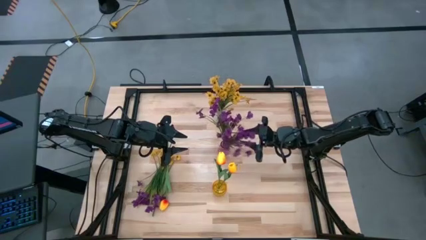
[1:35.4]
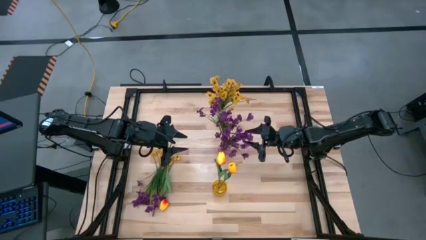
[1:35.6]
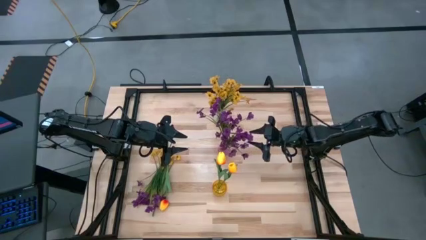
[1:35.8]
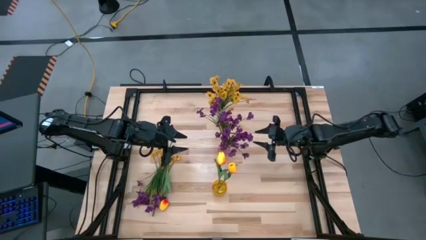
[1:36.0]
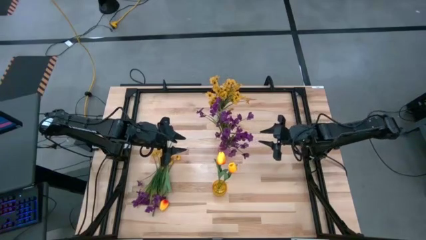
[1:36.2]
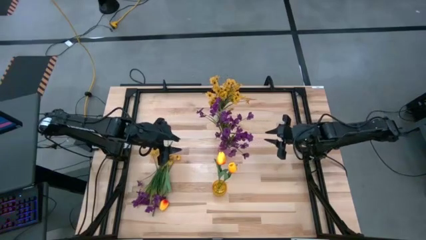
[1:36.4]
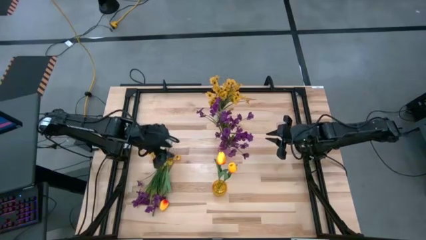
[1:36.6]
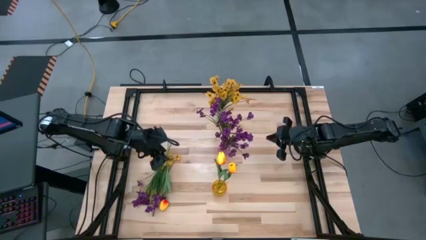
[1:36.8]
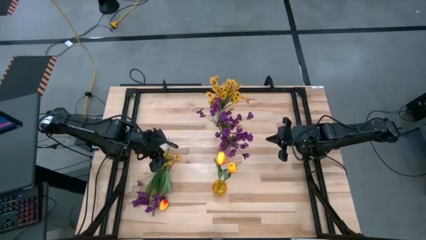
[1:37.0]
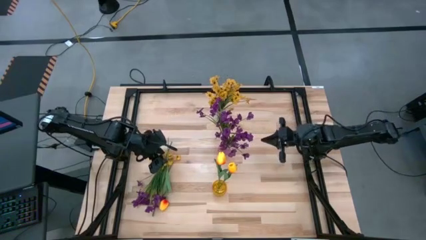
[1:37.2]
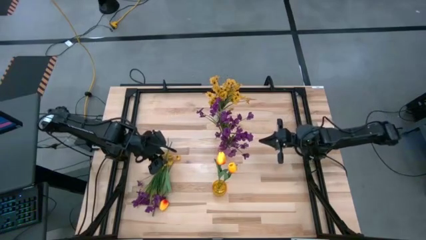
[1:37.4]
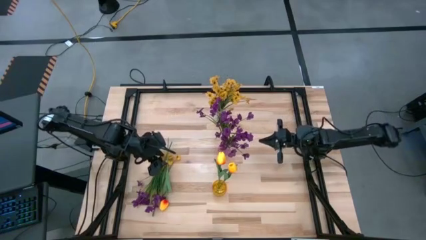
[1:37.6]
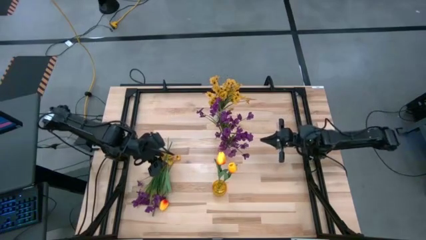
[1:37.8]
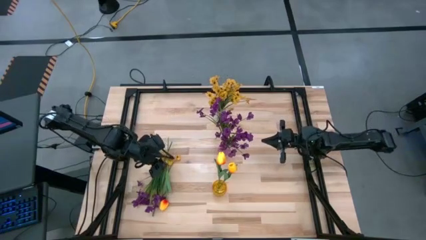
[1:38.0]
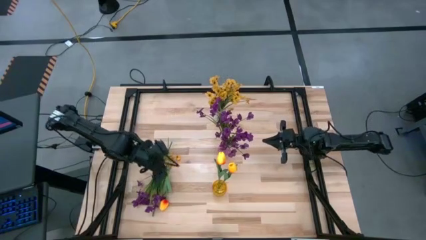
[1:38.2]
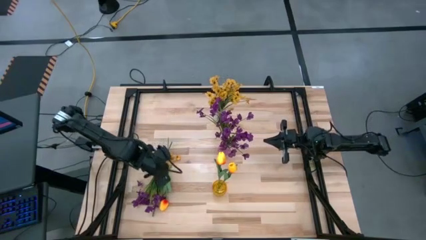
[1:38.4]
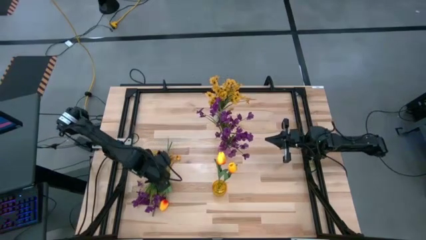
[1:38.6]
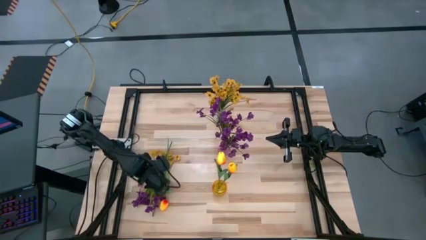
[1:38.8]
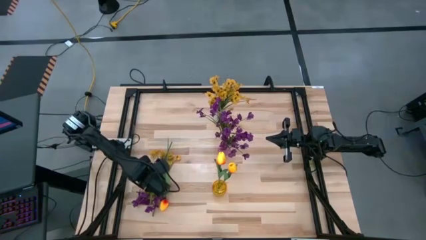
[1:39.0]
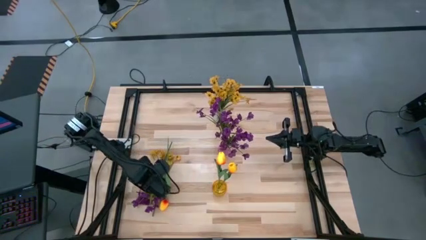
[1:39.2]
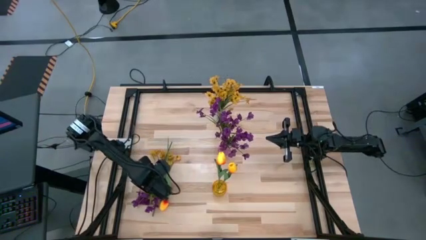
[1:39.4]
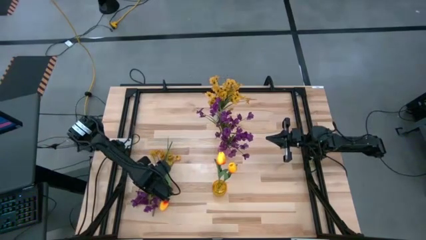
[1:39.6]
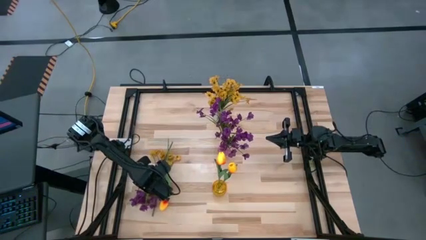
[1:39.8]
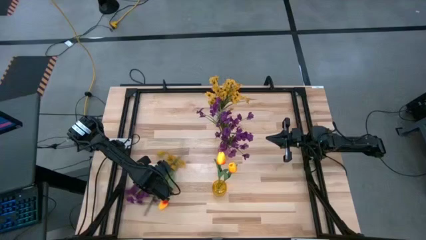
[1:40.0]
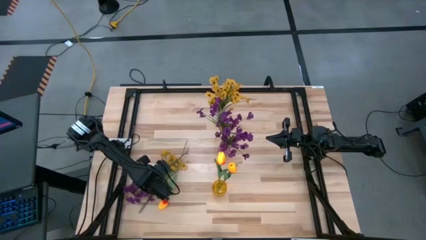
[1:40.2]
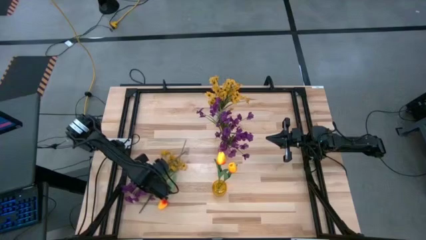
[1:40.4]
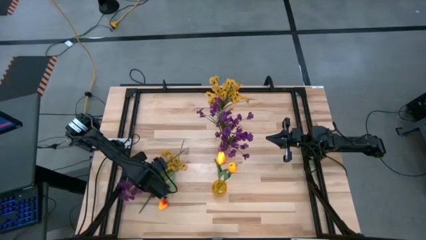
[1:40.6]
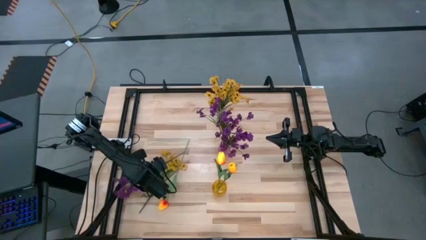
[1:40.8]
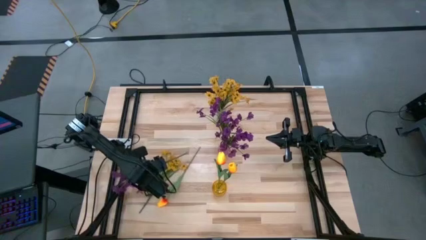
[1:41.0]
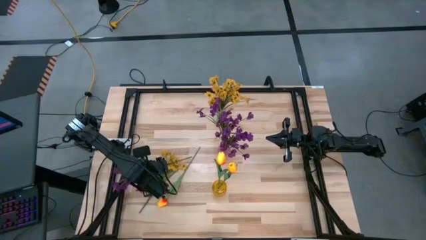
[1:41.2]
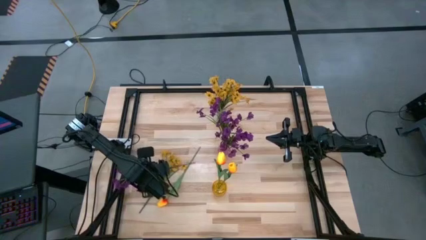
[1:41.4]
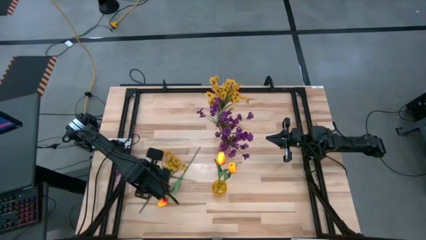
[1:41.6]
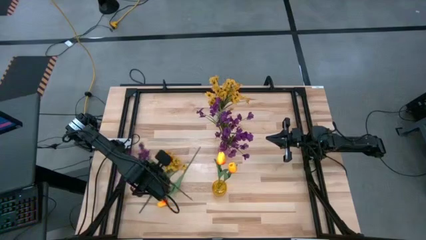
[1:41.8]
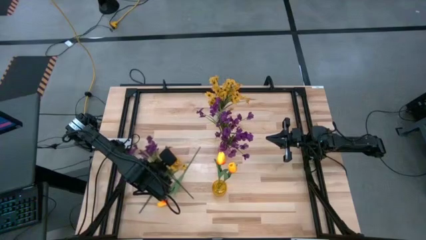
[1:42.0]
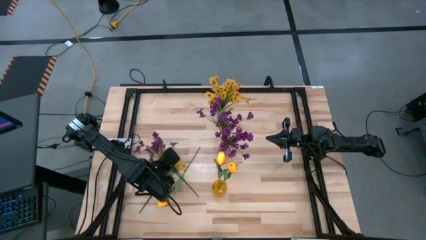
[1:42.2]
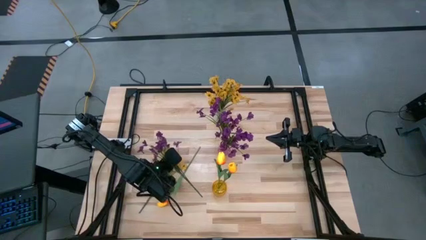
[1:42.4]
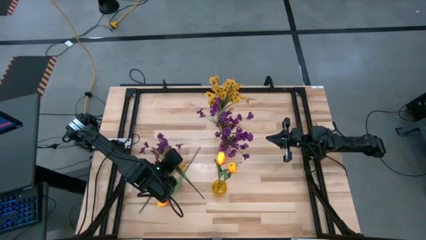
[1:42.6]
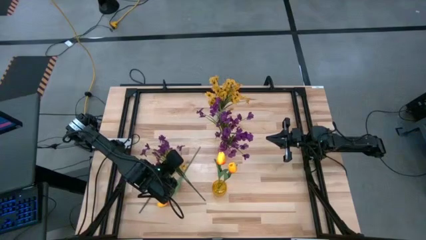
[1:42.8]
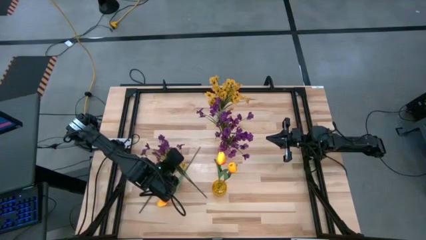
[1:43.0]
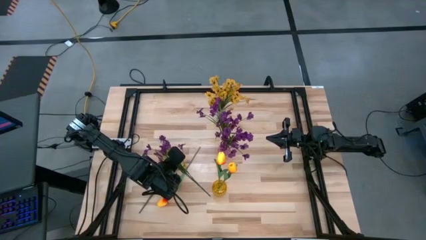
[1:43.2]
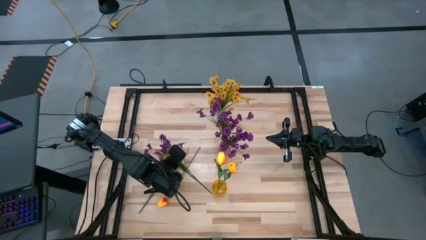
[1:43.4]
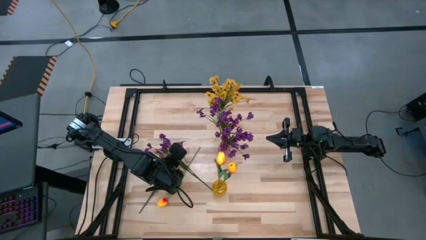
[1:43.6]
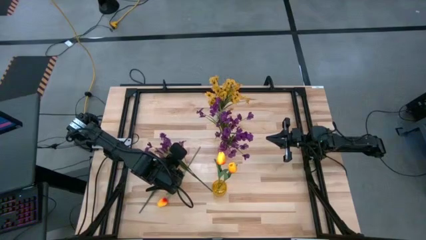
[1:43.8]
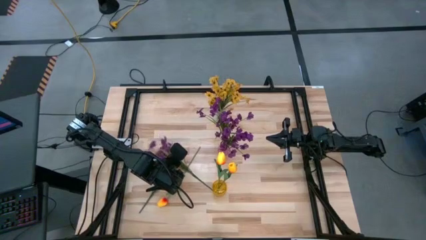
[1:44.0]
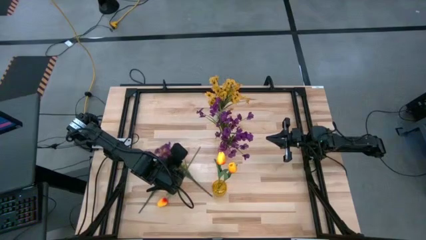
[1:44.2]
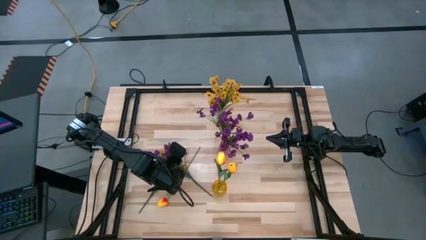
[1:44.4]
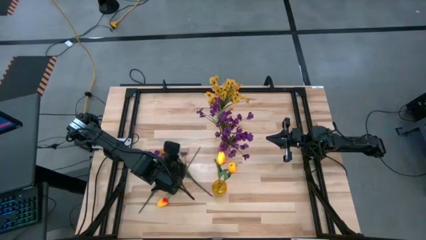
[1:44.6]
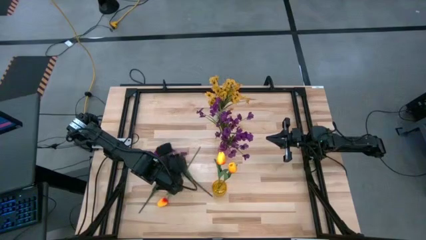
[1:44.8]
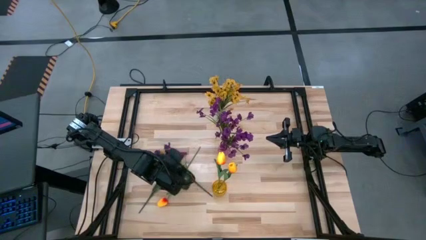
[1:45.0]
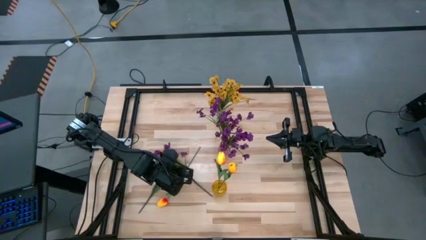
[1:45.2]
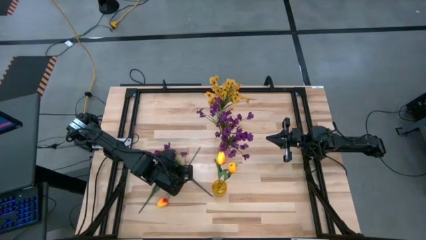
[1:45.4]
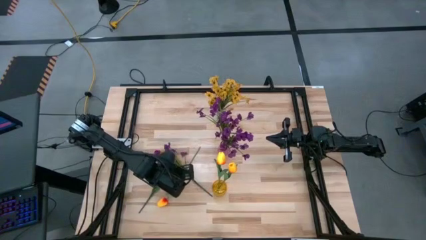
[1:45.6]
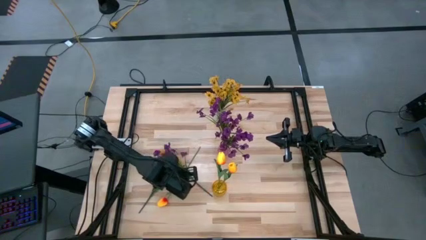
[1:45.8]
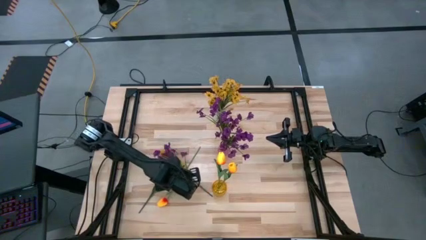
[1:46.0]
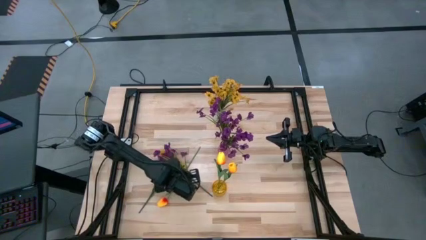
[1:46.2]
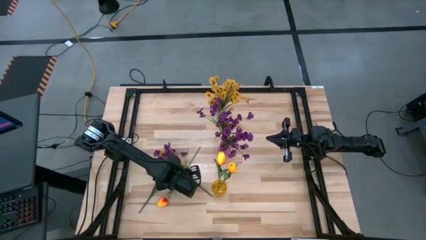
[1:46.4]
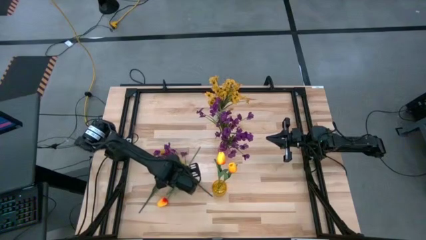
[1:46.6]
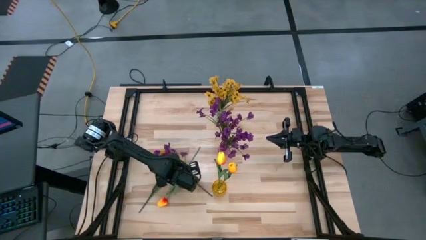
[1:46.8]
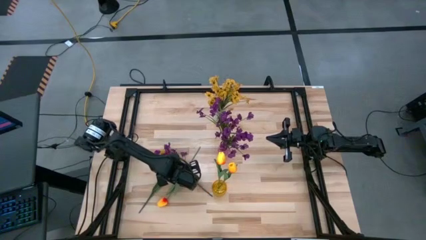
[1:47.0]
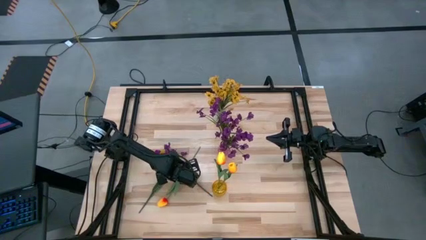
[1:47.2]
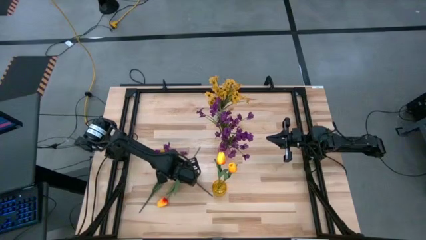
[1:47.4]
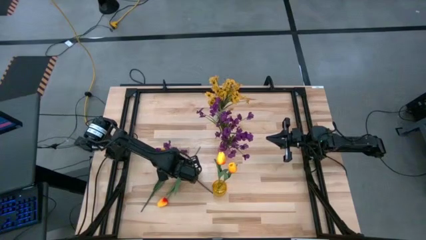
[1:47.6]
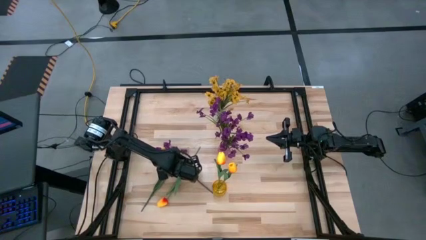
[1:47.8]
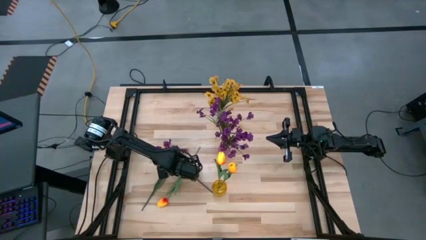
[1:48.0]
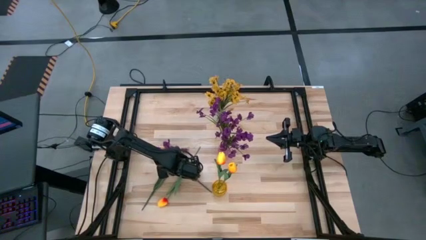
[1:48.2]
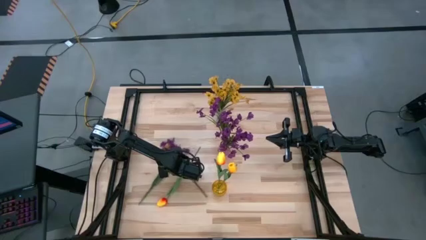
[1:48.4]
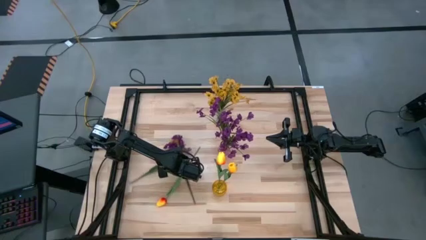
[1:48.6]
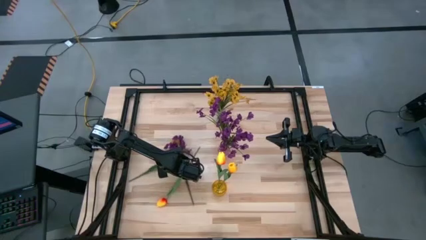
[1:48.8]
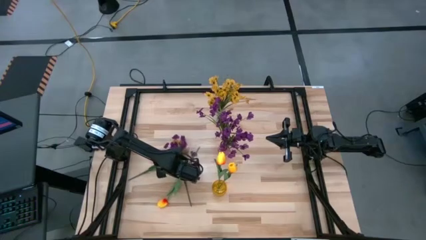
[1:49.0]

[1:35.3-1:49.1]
Task: Sort flowers into vase by color
Put the violet flowers into the violet vase
